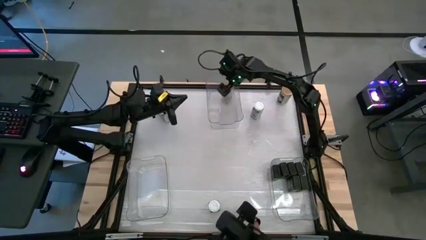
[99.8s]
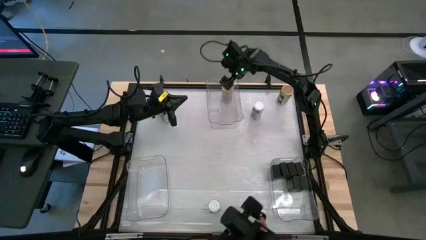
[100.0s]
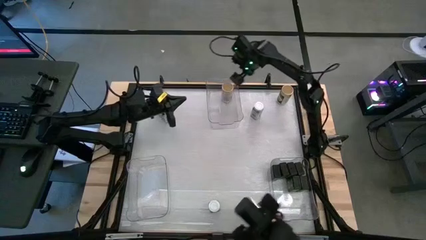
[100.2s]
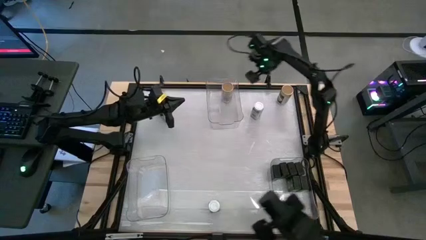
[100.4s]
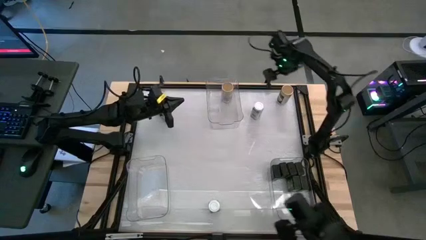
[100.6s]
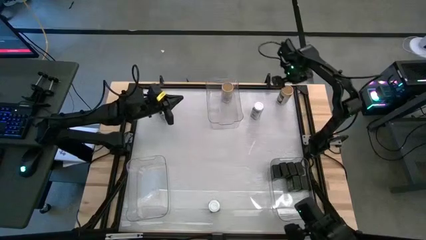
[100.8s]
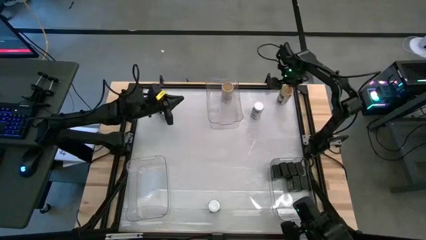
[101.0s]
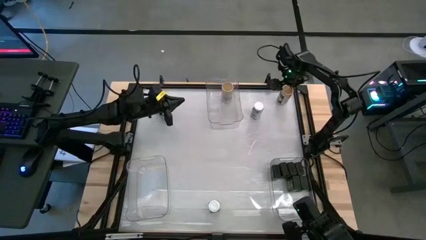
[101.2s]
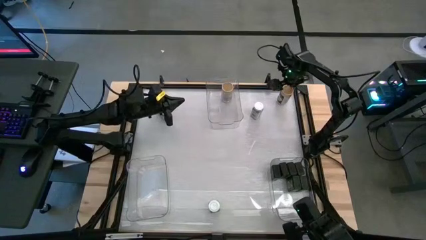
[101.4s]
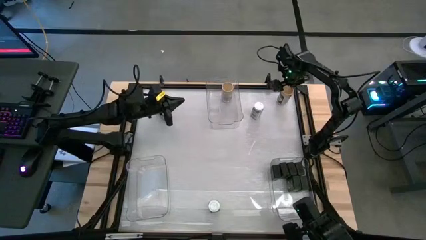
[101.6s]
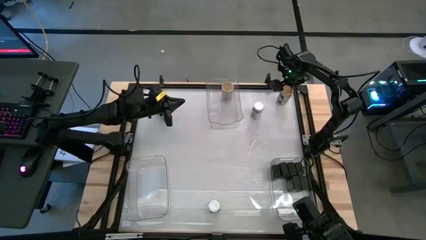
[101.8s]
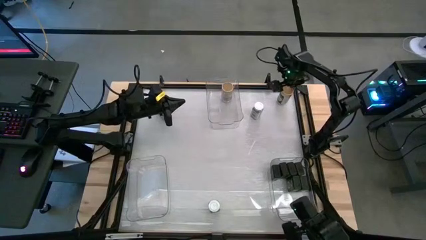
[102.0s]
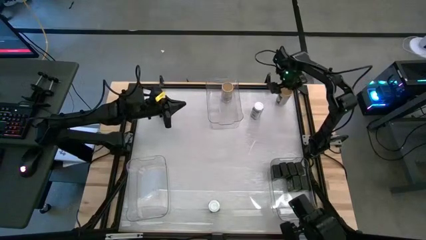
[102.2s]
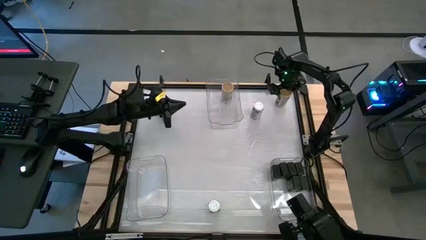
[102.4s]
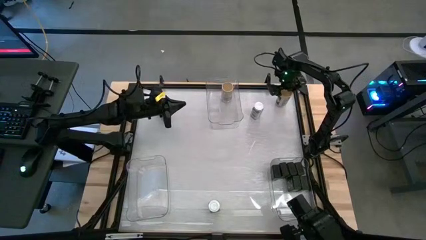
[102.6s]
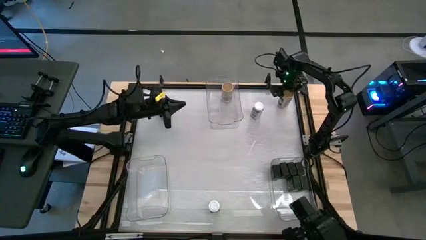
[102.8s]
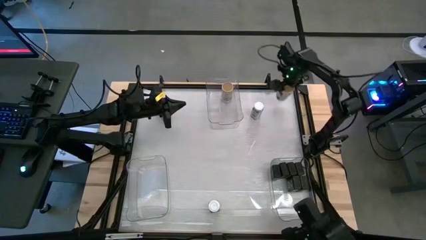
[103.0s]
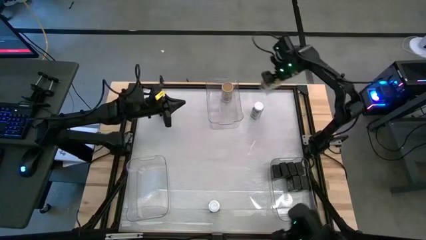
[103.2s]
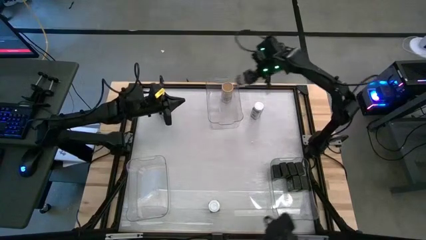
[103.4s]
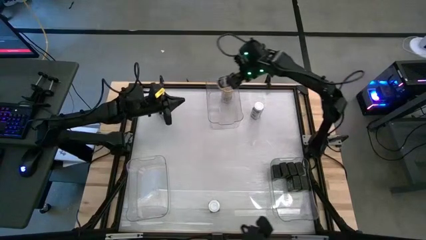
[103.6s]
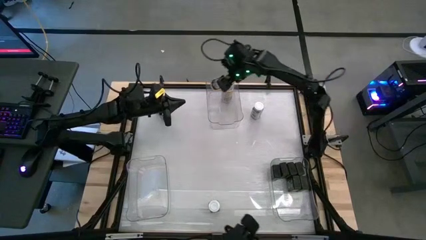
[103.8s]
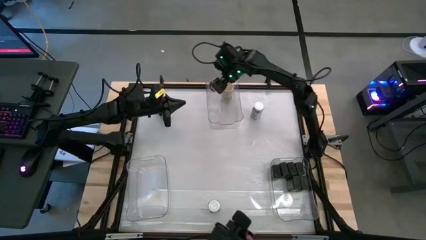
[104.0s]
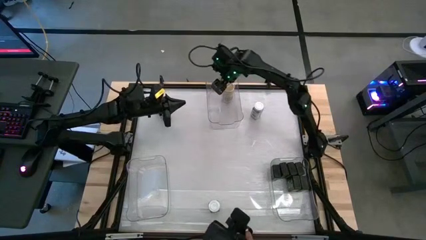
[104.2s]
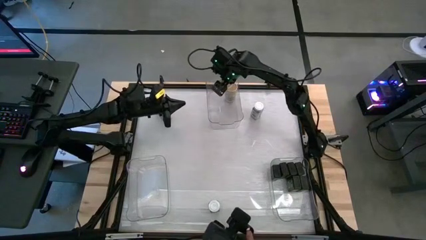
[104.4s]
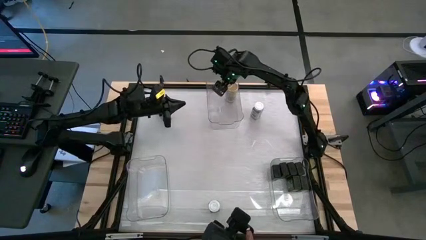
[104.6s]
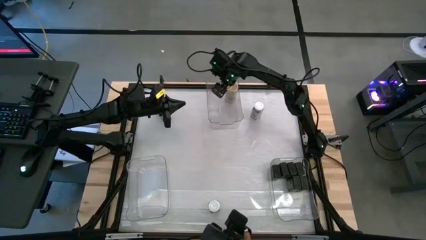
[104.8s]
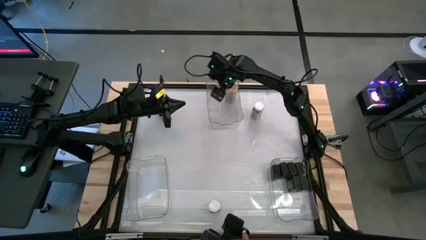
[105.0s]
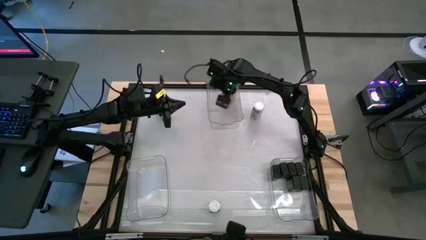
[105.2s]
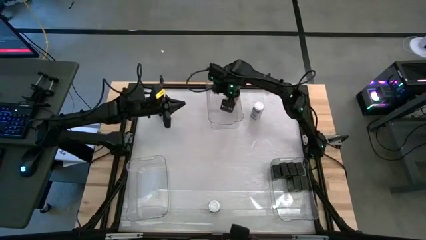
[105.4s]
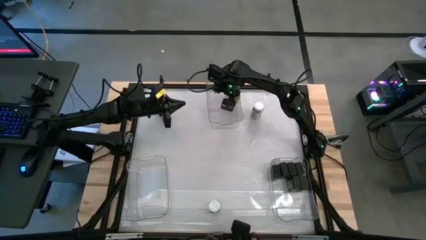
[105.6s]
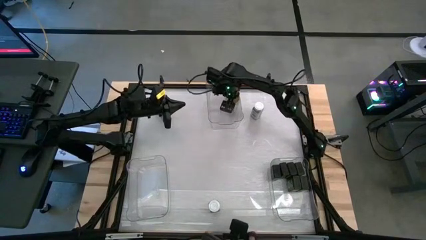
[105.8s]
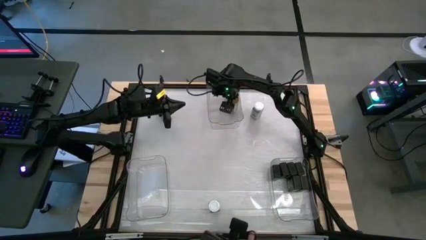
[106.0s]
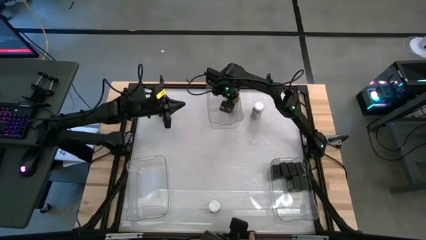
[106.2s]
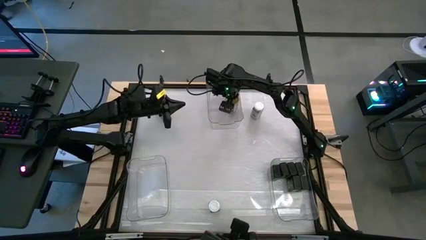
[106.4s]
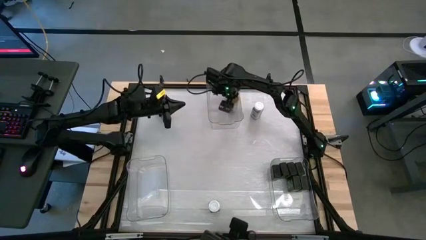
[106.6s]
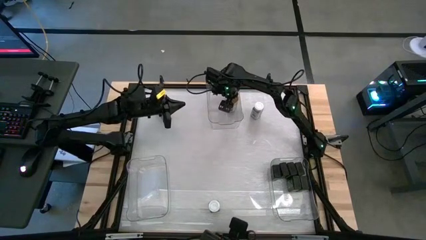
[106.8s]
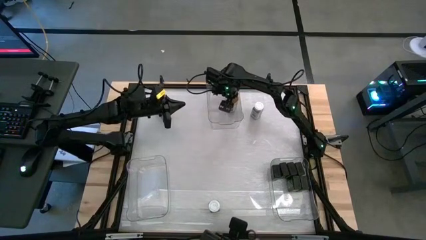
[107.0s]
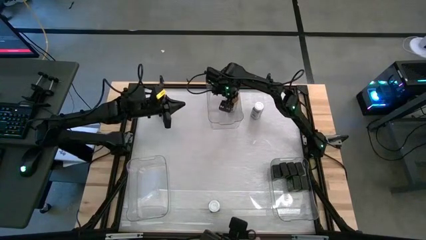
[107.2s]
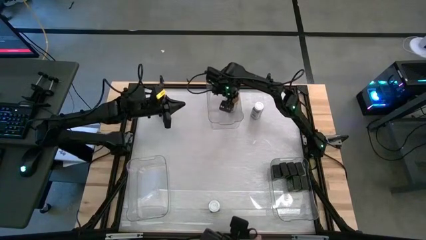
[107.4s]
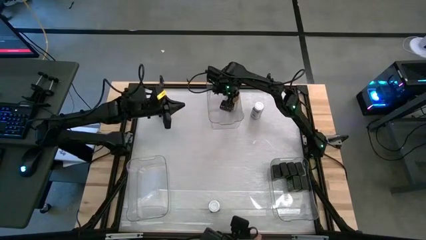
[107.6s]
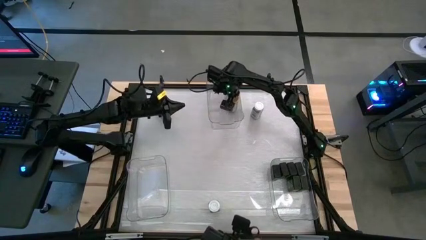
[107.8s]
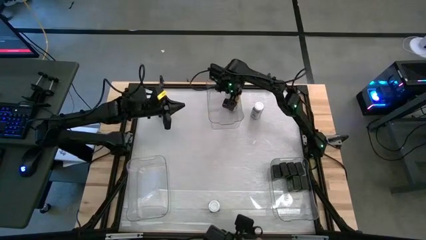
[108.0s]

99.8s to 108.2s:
Task: Sort spices by type
Put the gold spice bottle into the top transparent bin

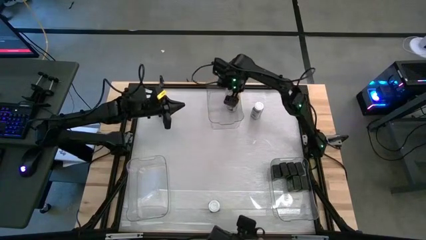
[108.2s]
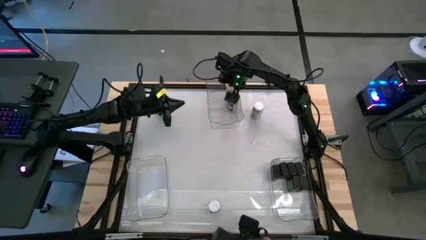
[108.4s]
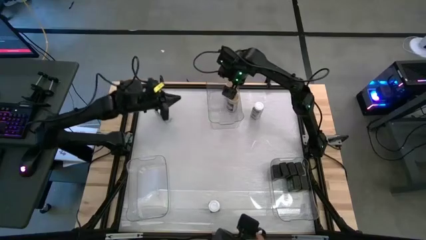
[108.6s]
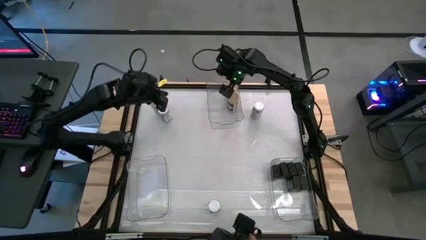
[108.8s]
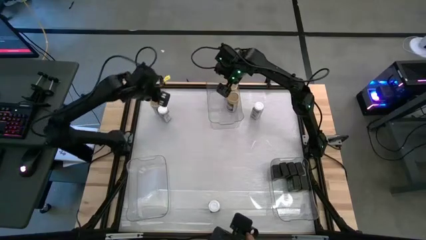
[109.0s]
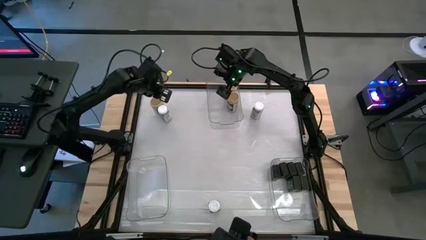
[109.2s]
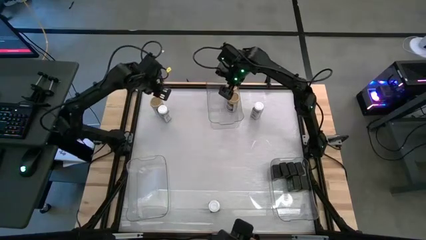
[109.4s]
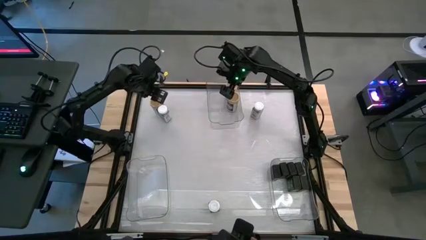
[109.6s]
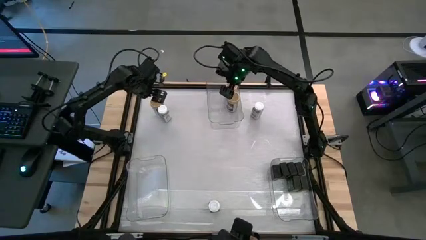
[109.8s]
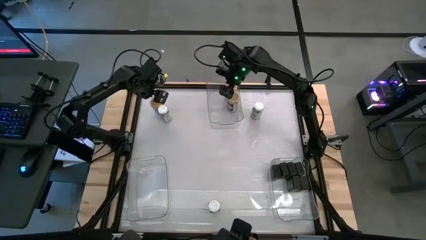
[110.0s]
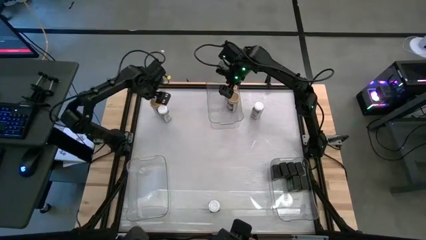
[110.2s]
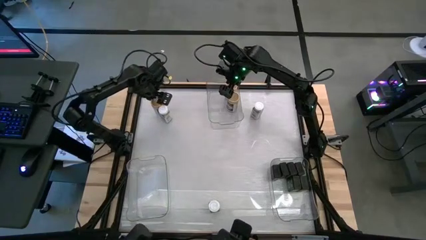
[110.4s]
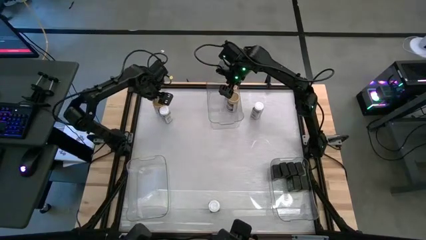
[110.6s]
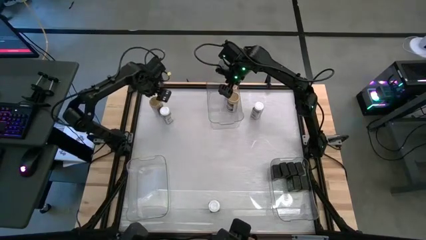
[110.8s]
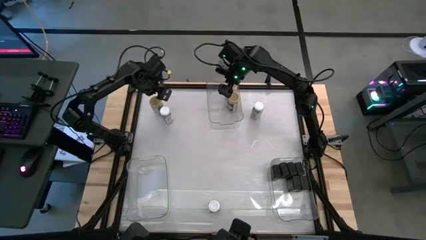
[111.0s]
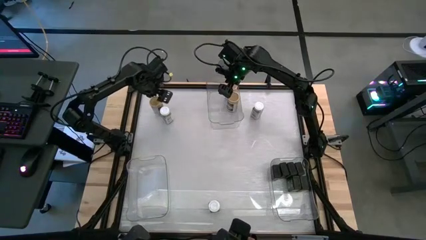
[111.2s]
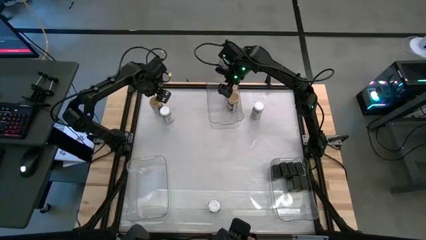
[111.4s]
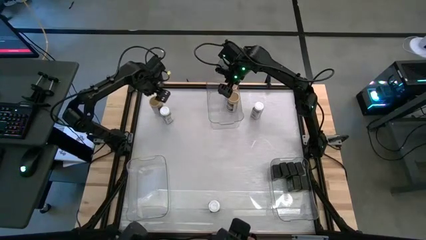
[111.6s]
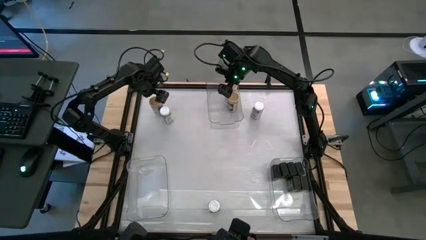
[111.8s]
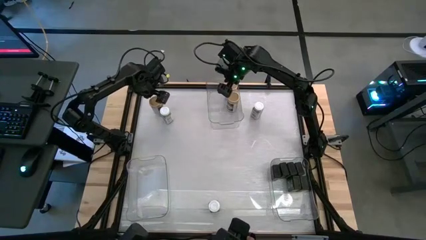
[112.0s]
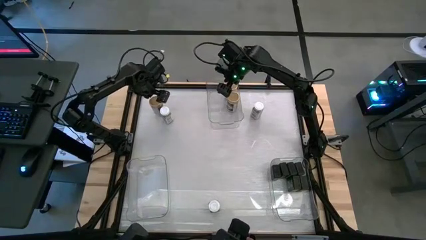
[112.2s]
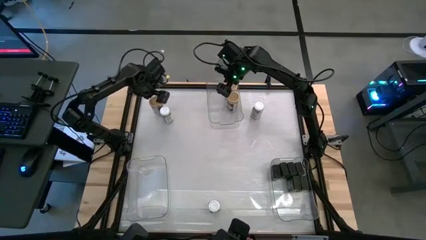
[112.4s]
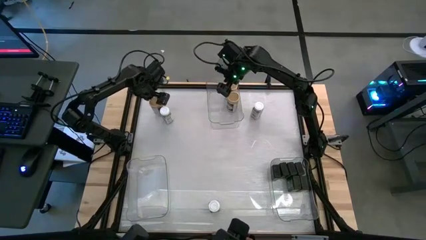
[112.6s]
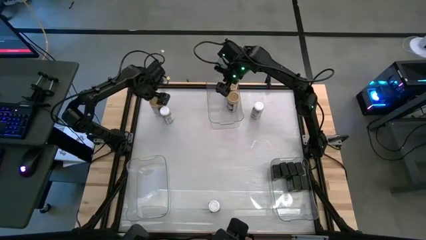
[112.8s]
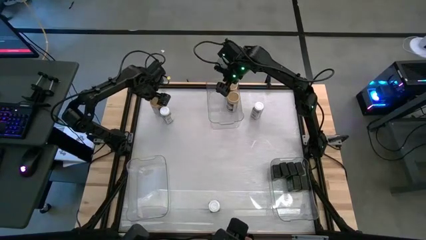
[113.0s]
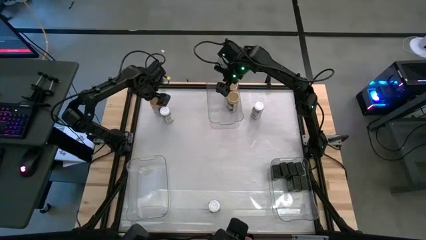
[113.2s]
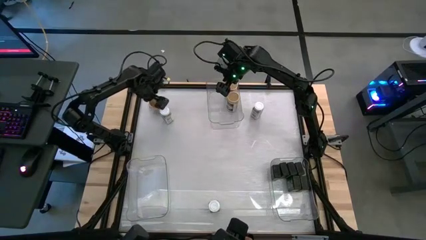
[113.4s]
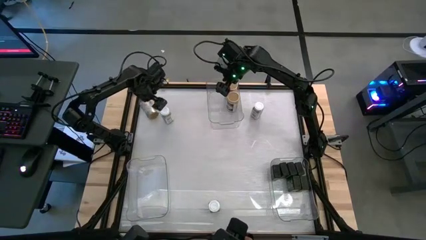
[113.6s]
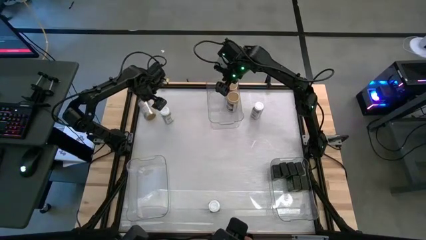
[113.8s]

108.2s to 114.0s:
Put the gold spice bottle into the top transparent bin

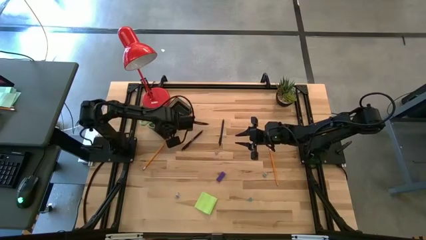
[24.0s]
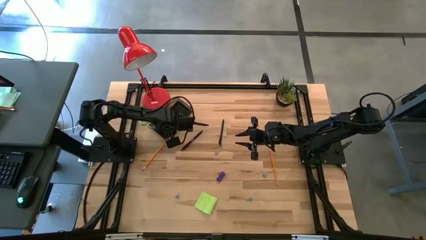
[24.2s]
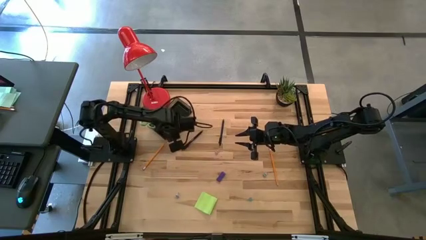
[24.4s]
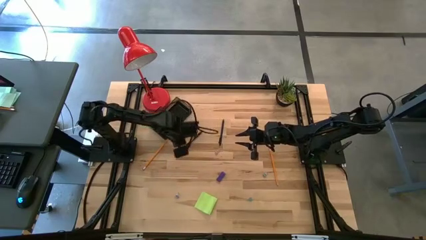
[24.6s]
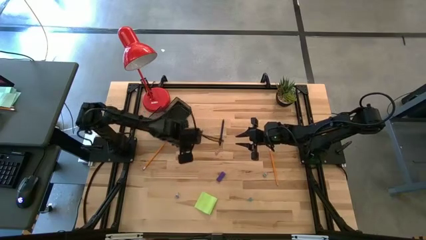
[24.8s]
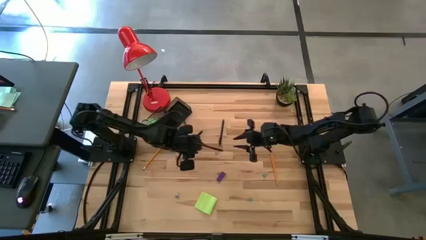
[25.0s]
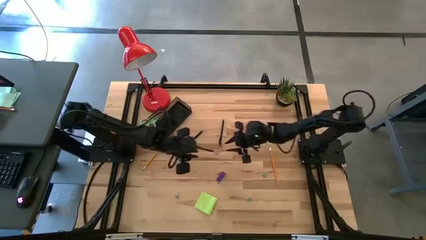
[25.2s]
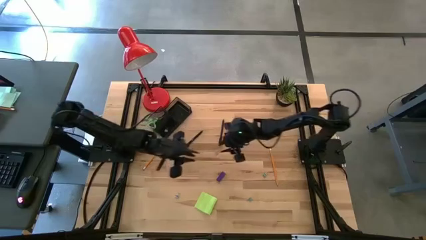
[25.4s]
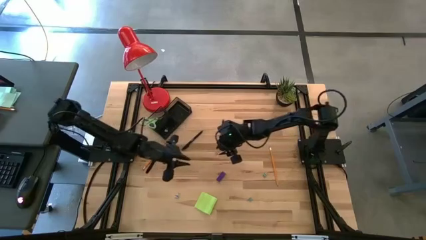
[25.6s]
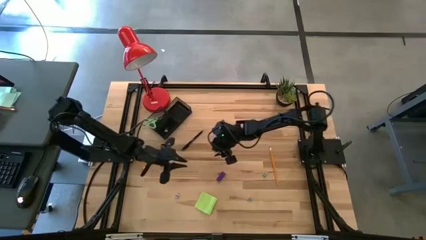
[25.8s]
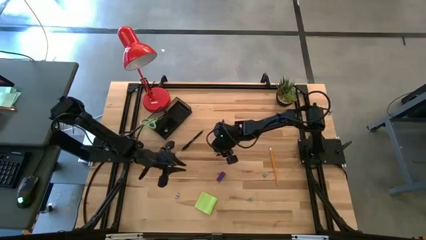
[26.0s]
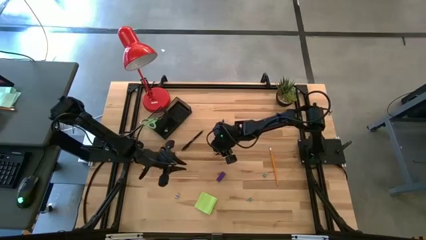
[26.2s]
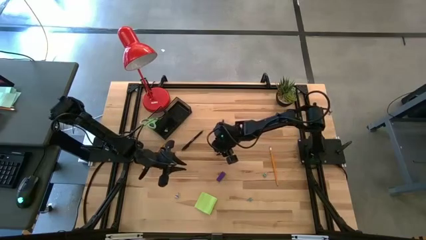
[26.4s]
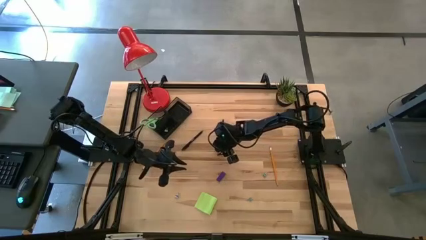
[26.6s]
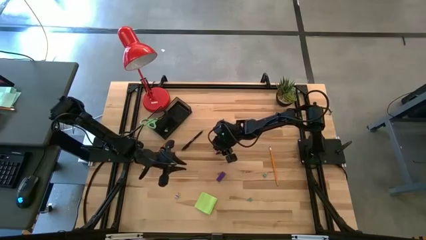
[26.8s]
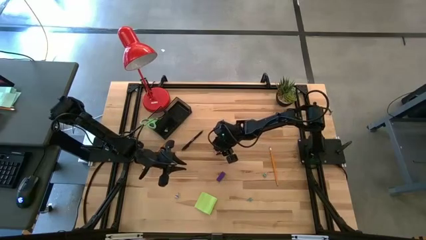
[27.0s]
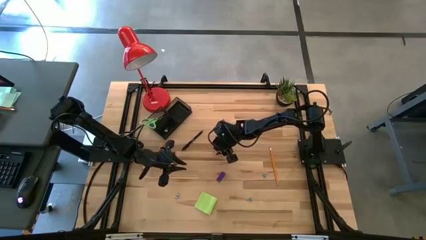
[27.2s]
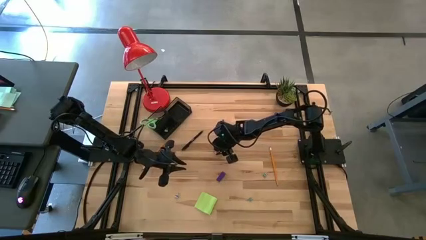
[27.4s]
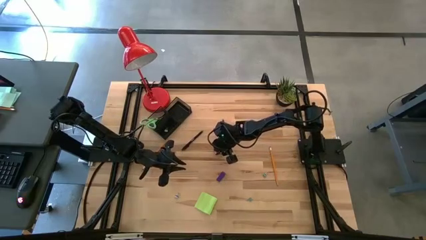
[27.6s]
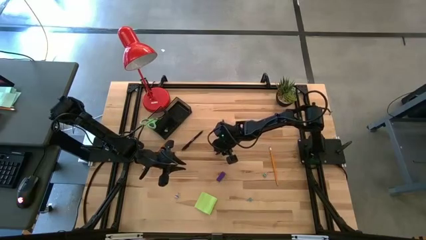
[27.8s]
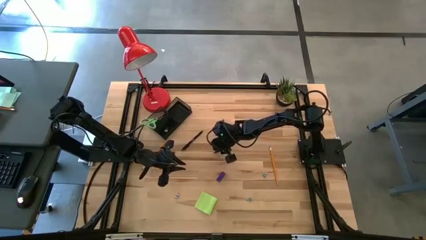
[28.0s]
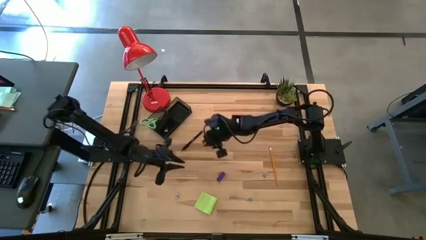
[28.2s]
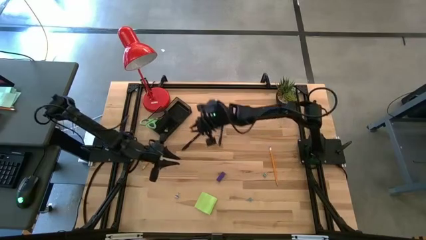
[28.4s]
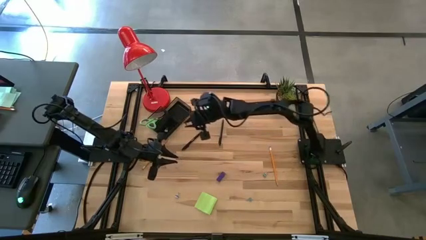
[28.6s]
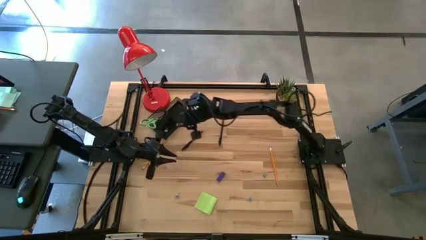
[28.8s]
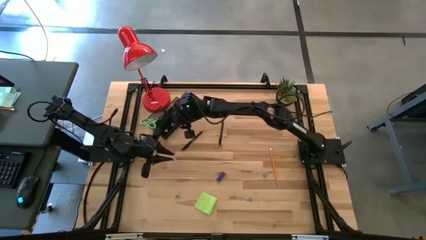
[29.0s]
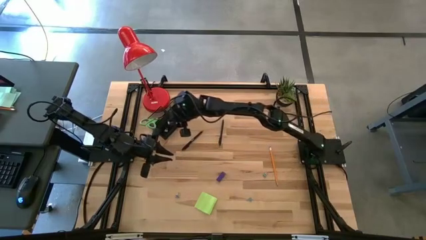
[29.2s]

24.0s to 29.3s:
Task: Pick and place office supplies into organizer
Put the pink binder clip into the desk organizer
